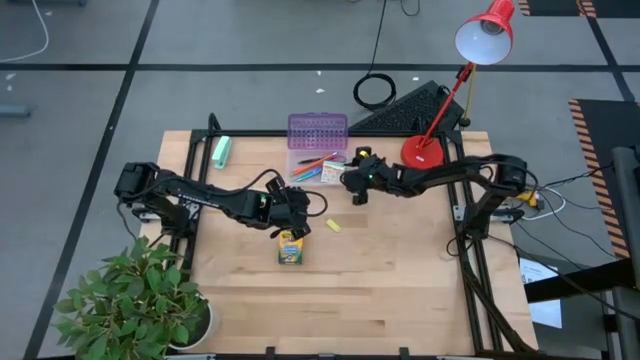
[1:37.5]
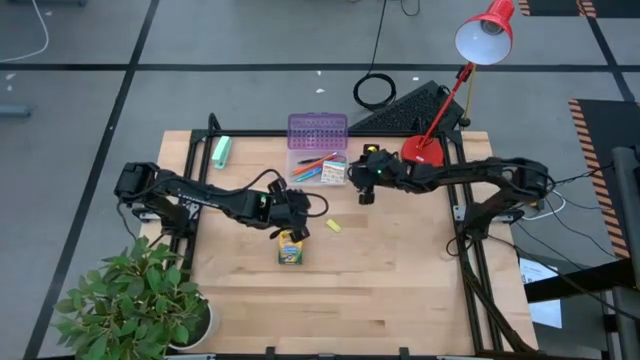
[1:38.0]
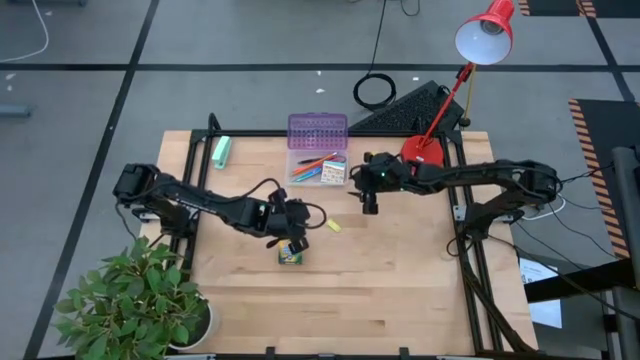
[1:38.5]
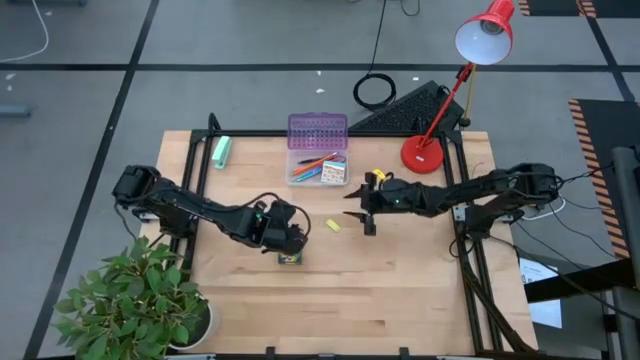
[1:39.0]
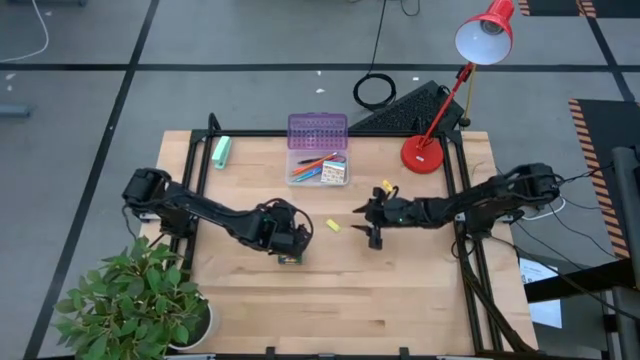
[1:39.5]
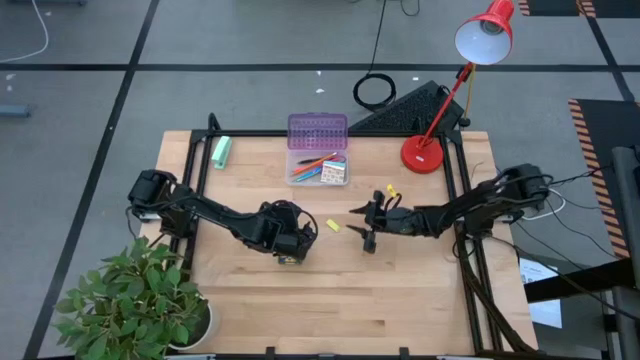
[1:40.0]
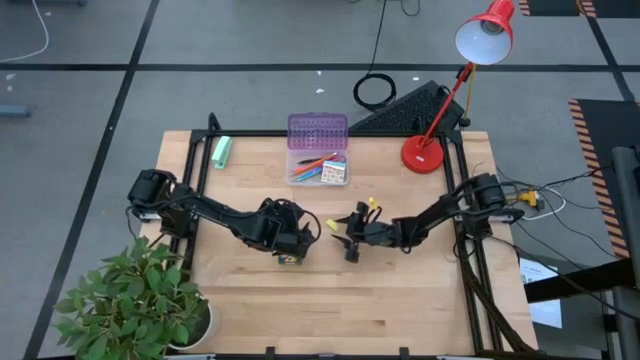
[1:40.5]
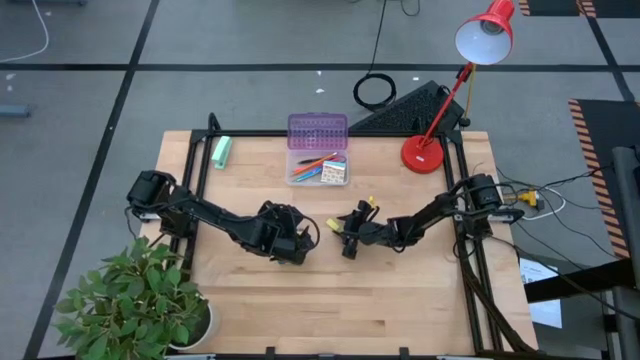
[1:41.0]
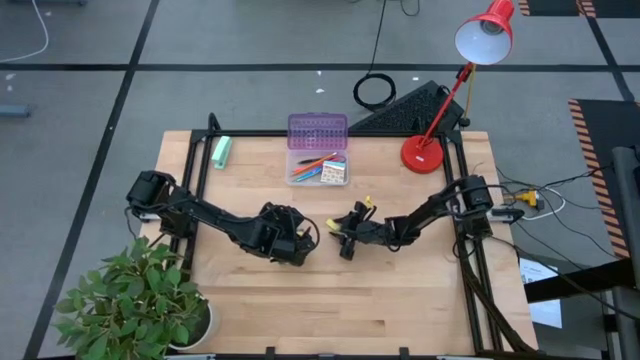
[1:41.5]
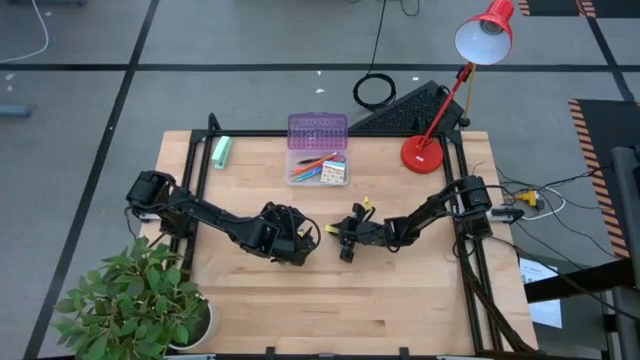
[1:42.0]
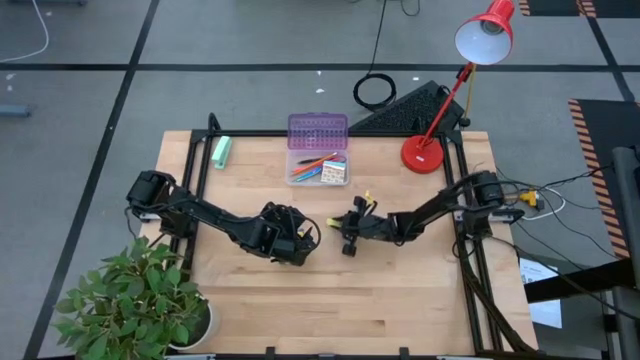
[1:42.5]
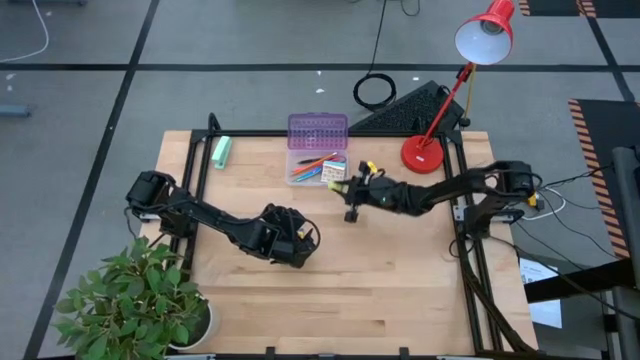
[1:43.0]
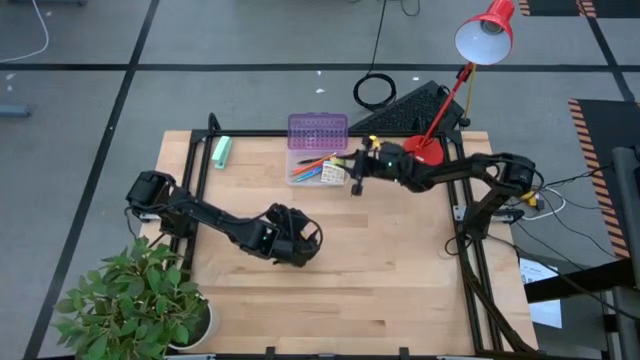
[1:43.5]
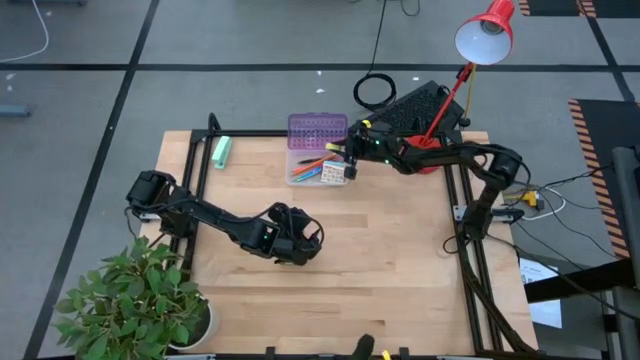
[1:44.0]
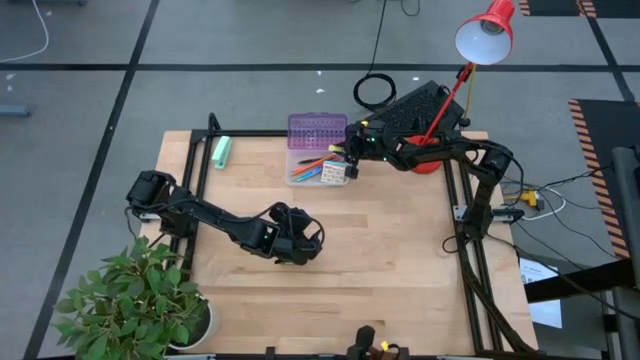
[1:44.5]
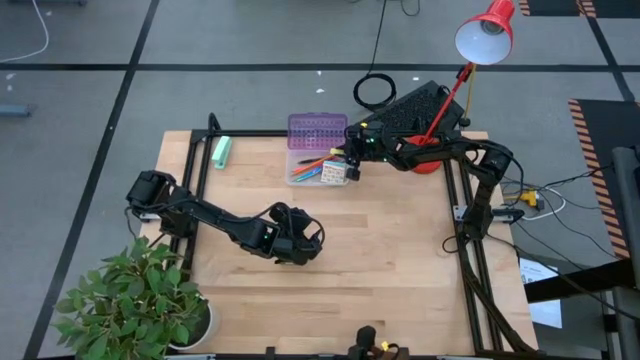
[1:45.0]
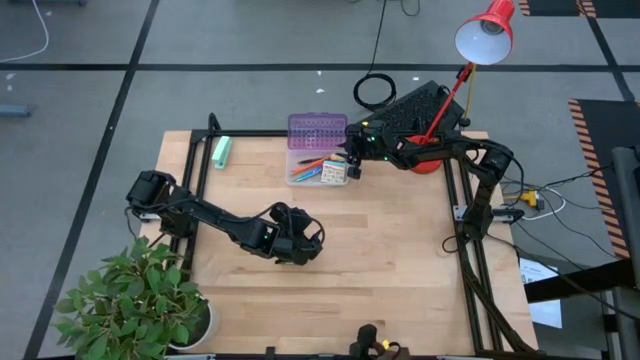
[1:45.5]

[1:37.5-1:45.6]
Task: Pack school essentials
Put the green eraser into the purple supply box

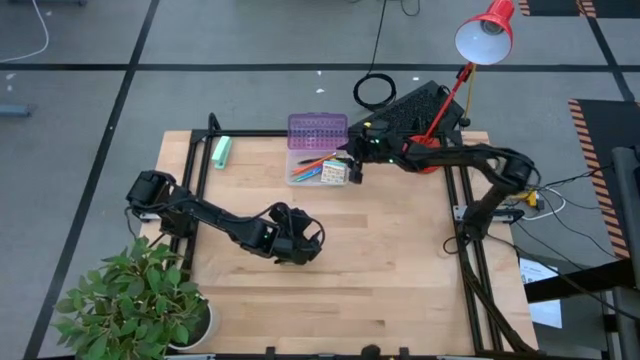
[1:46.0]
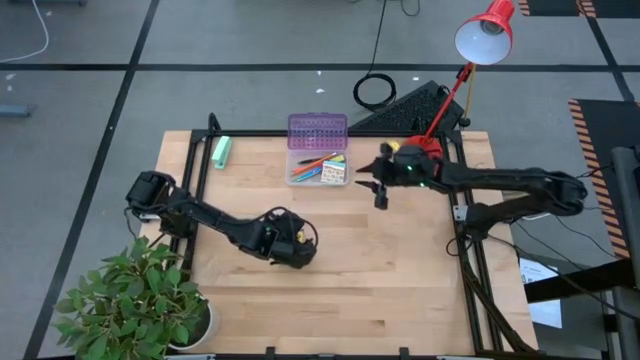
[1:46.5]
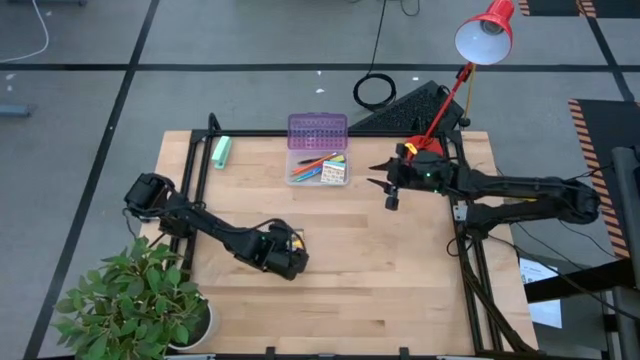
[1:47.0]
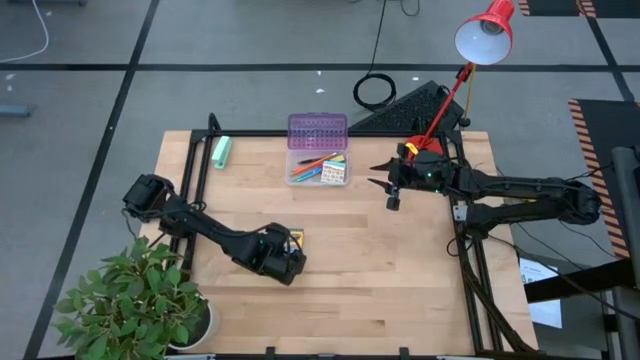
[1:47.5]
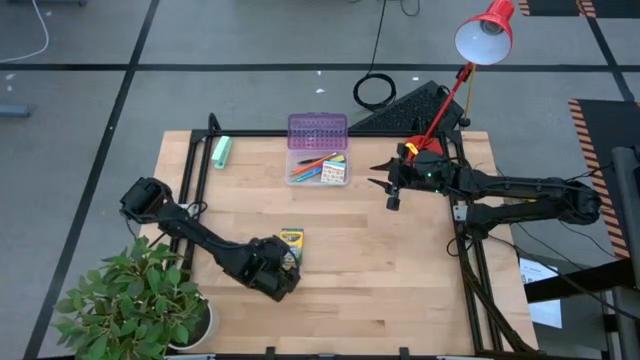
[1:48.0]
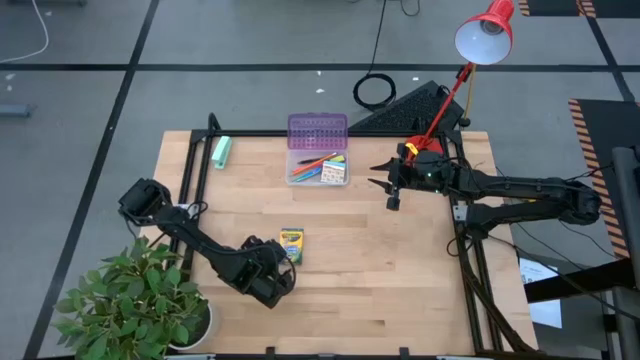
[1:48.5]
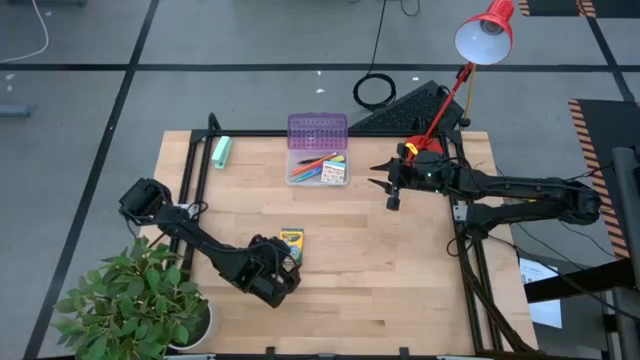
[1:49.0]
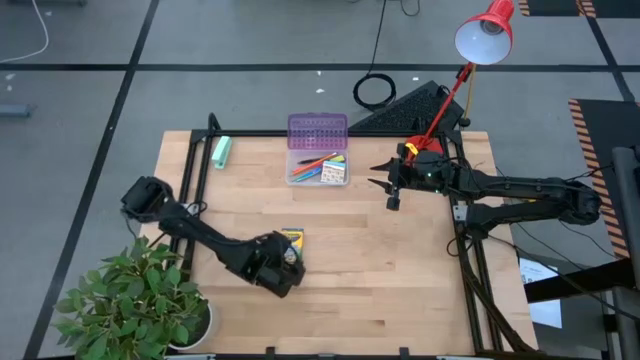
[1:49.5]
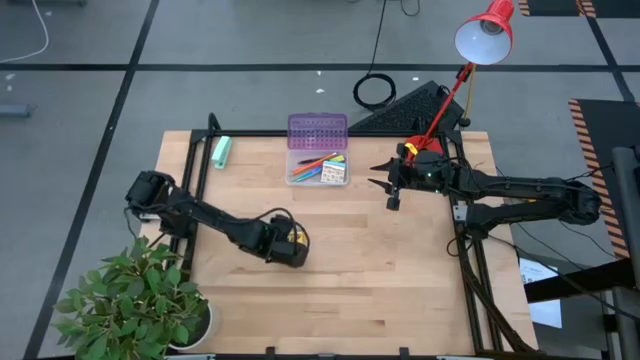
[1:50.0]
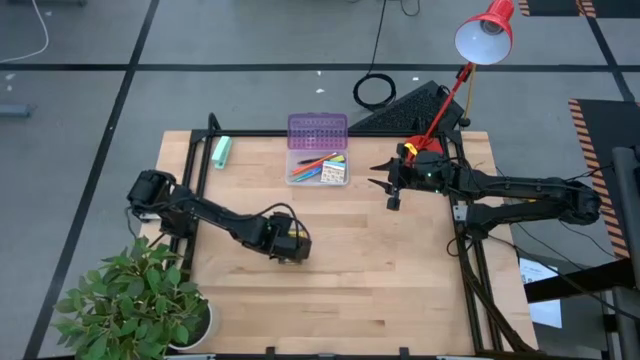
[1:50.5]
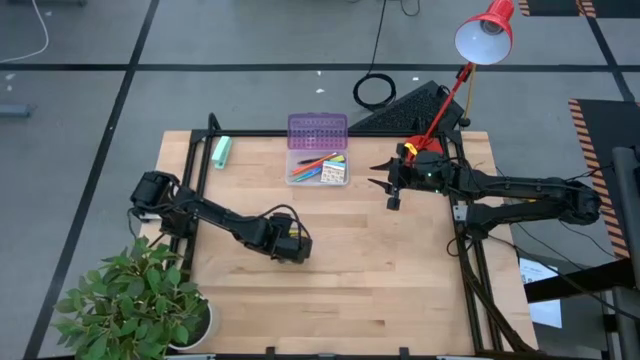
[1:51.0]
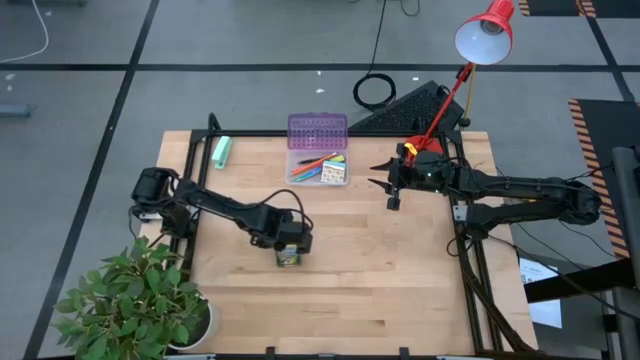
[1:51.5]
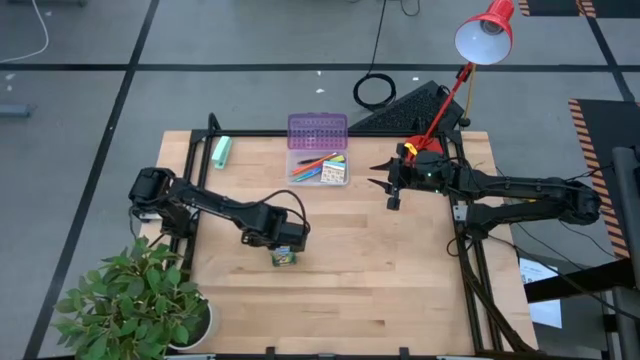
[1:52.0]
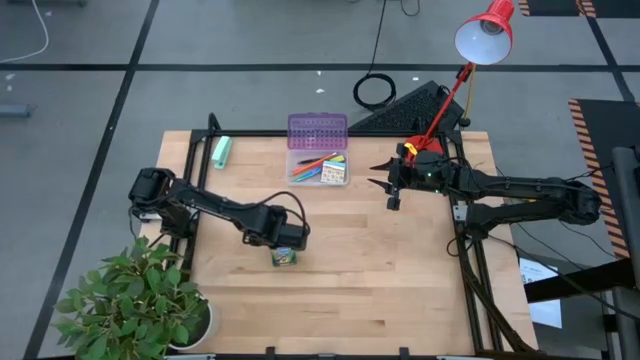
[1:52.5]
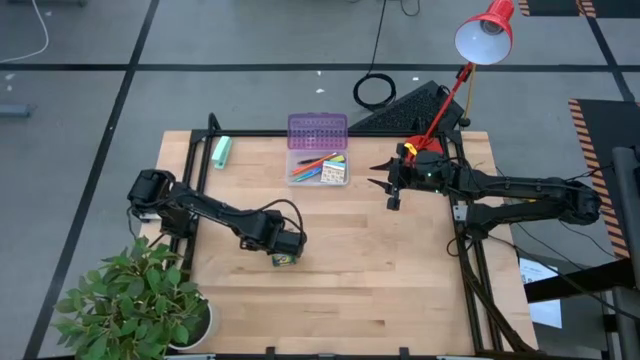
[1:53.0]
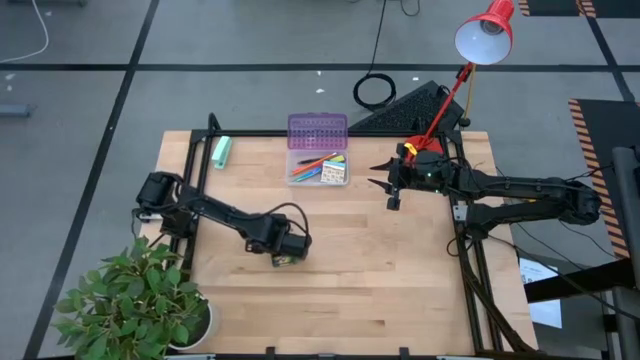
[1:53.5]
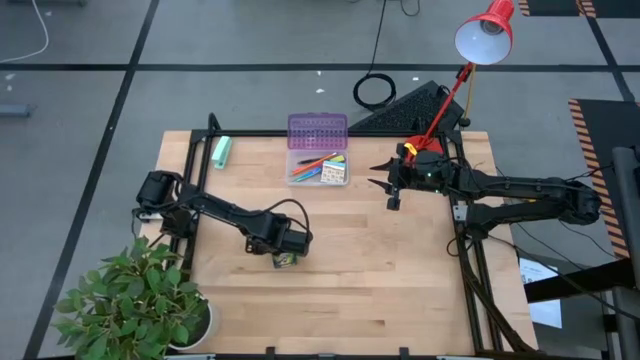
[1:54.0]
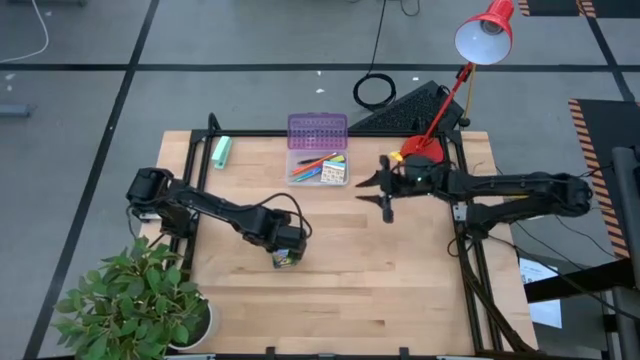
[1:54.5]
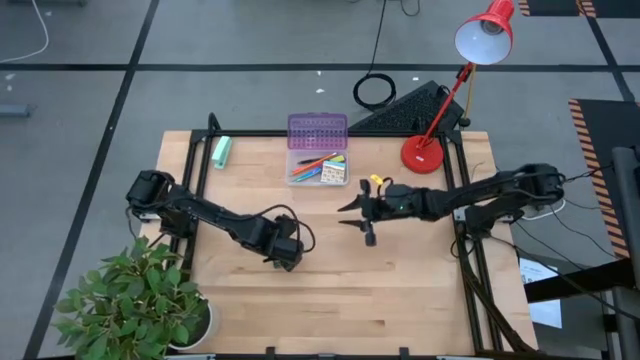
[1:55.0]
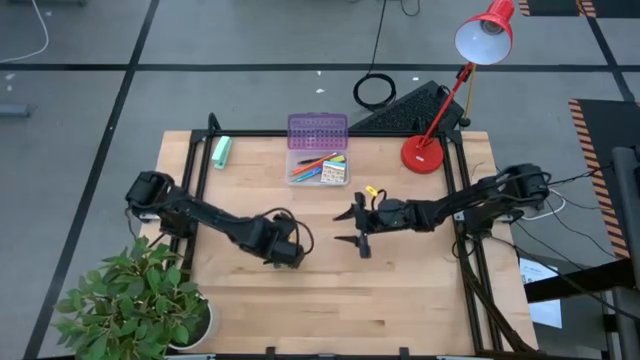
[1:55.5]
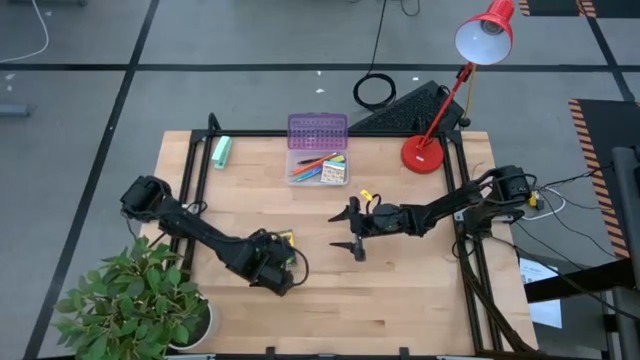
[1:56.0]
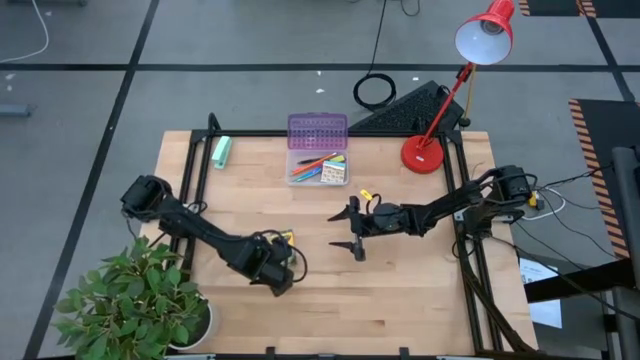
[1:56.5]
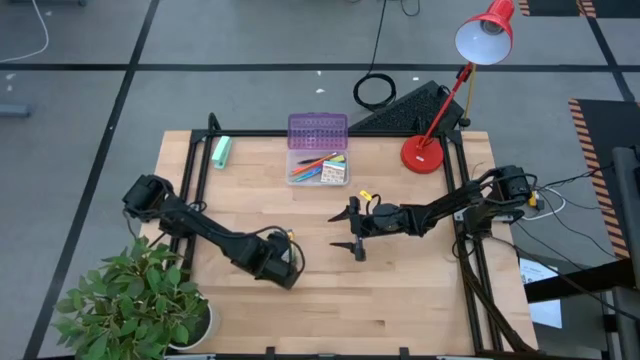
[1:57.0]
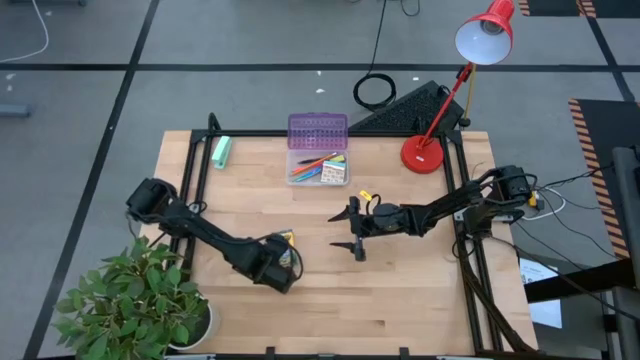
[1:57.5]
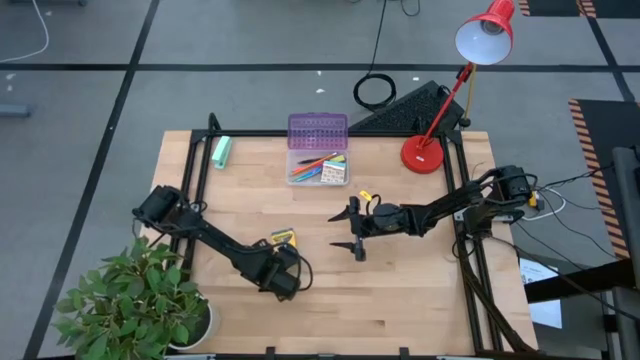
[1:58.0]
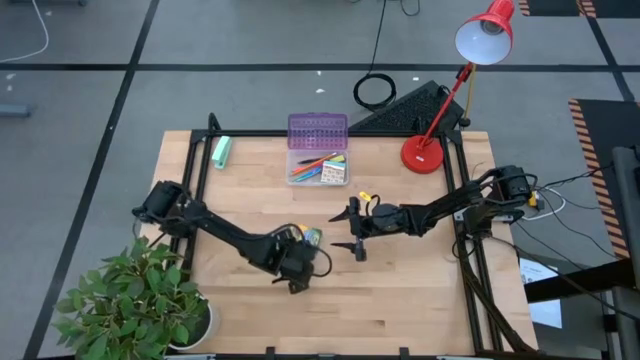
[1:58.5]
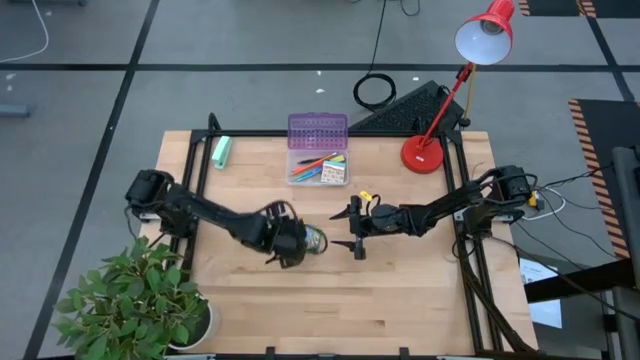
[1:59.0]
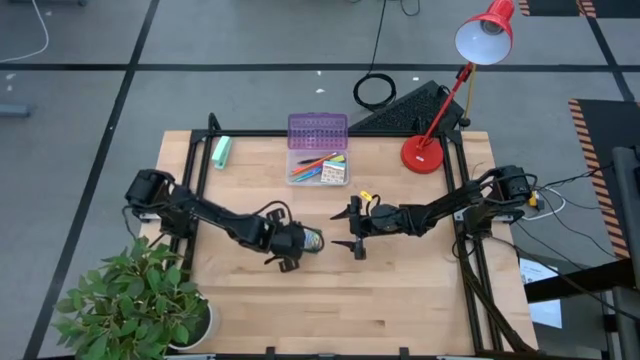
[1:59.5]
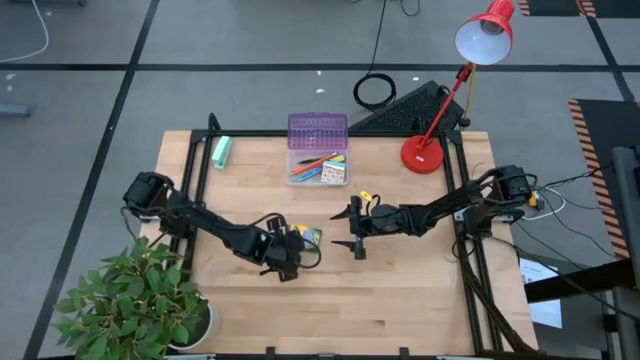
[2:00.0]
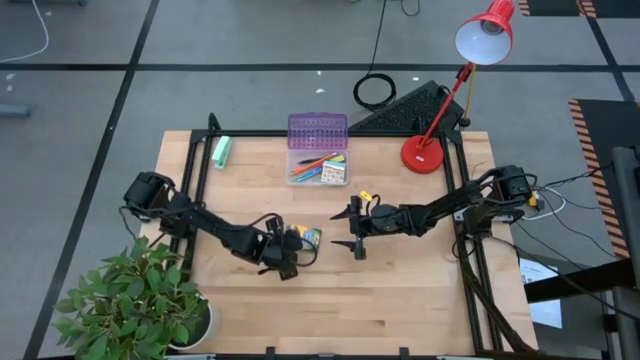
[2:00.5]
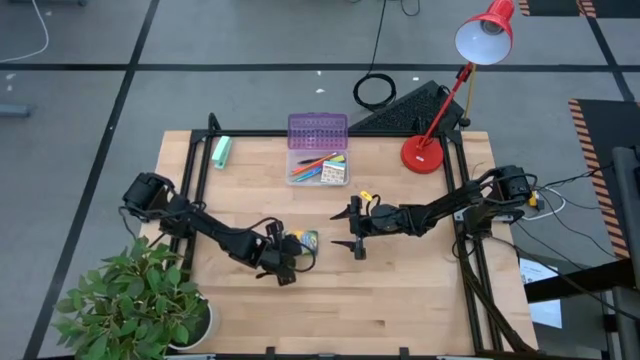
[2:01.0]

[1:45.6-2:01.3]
Put the yellow crayon box into the purple supply box
